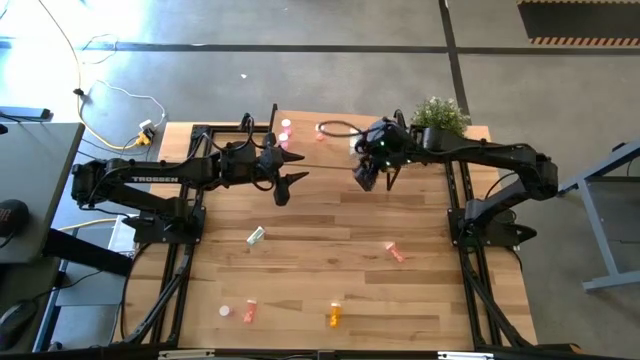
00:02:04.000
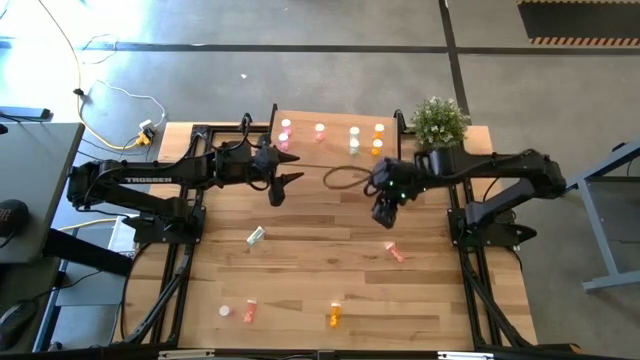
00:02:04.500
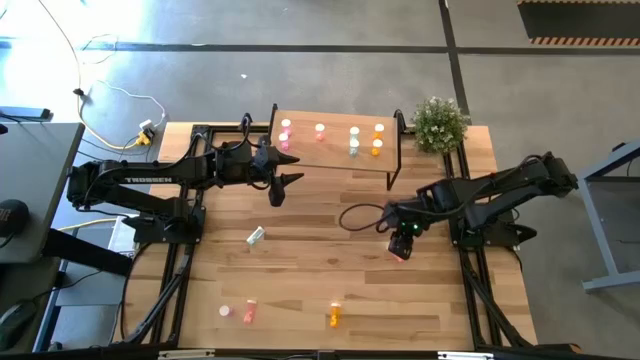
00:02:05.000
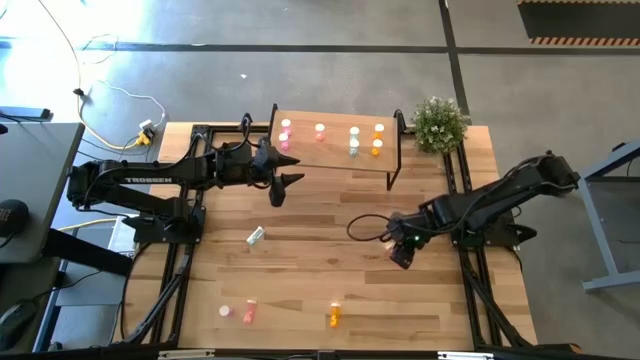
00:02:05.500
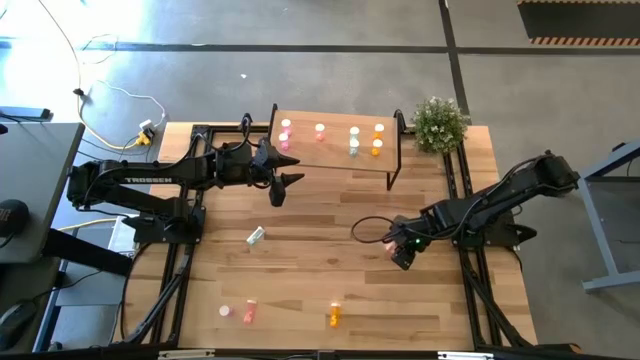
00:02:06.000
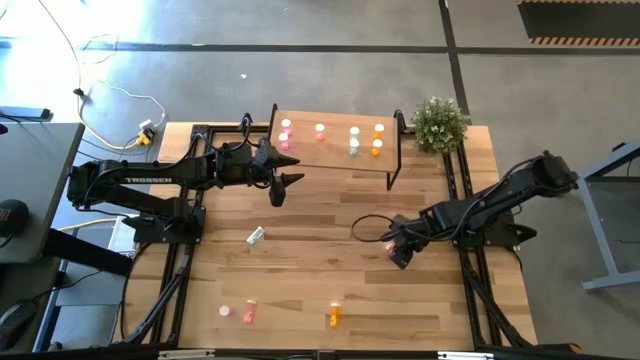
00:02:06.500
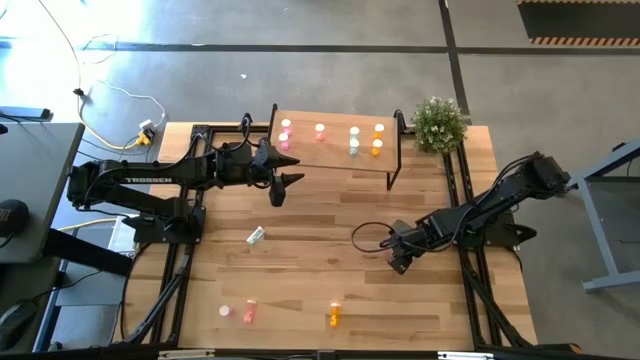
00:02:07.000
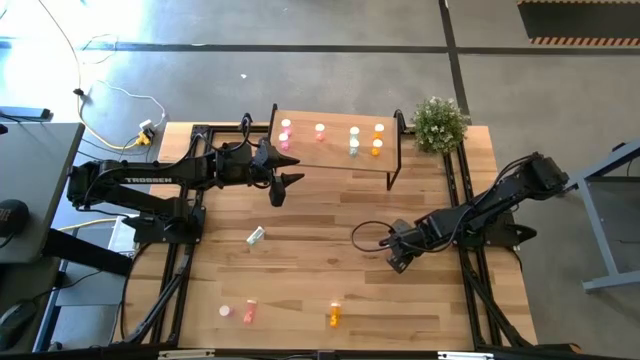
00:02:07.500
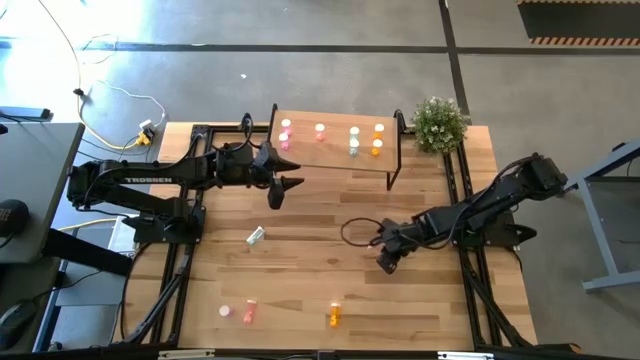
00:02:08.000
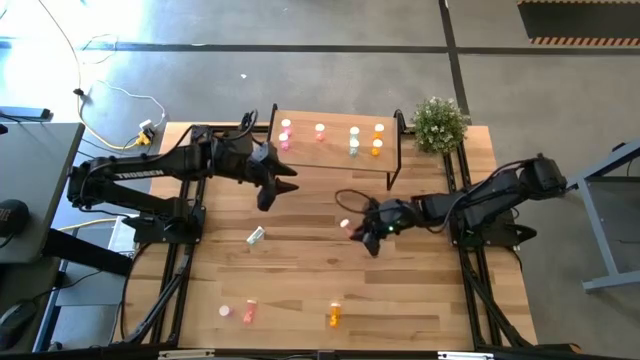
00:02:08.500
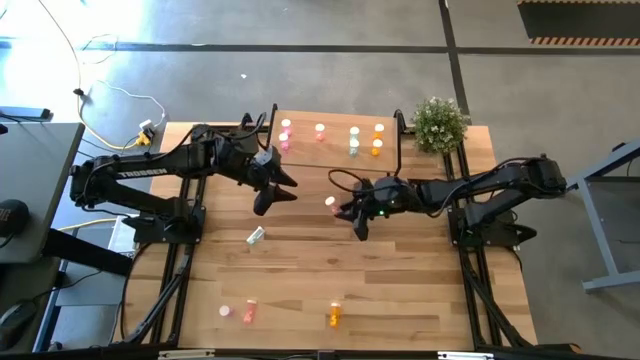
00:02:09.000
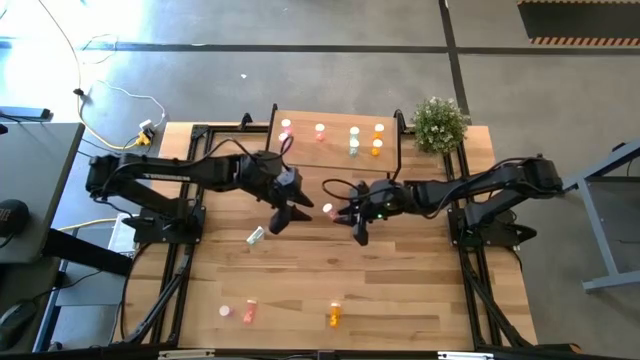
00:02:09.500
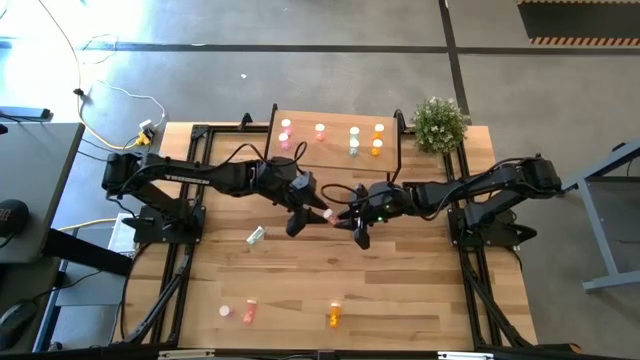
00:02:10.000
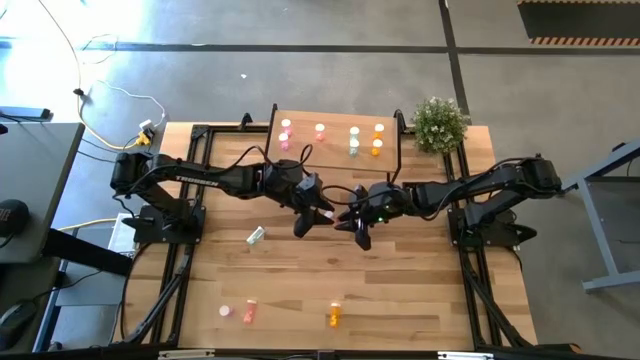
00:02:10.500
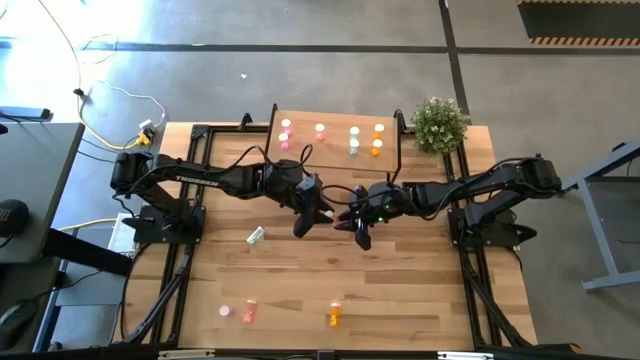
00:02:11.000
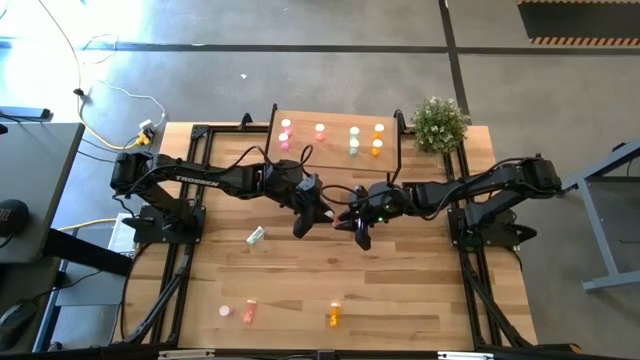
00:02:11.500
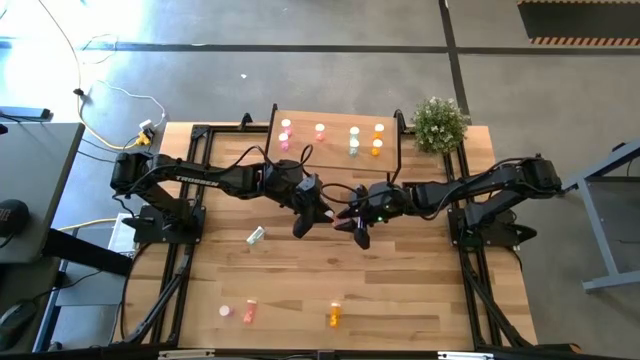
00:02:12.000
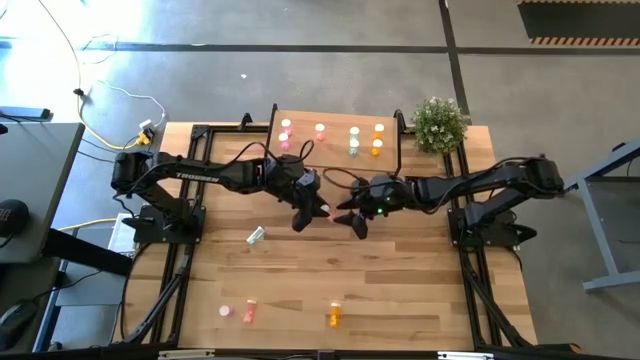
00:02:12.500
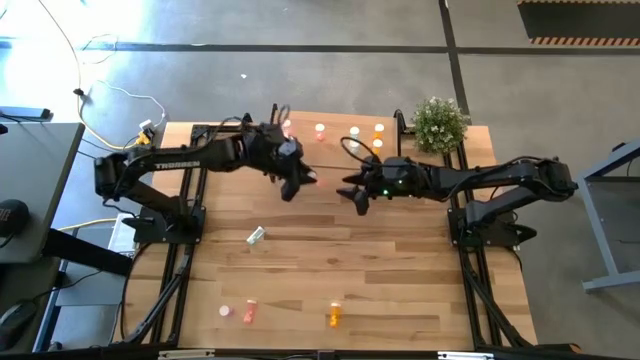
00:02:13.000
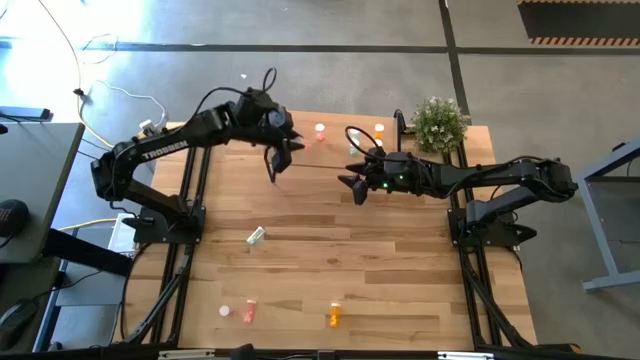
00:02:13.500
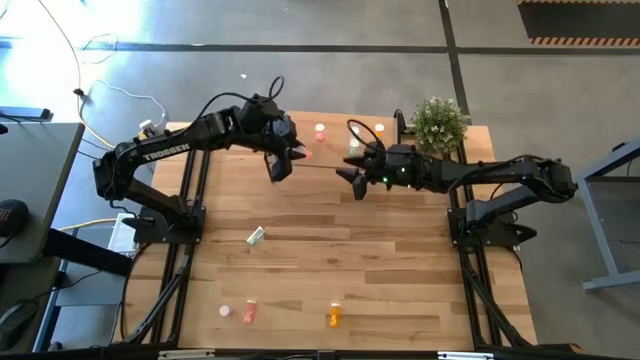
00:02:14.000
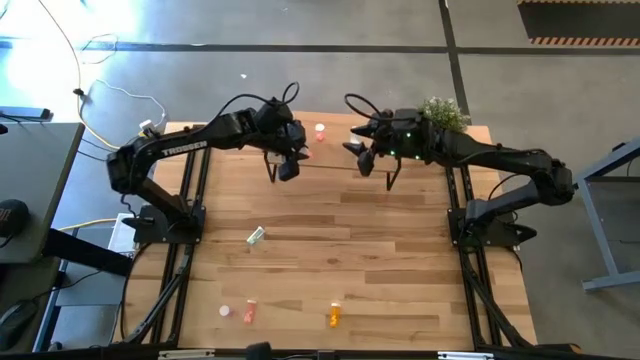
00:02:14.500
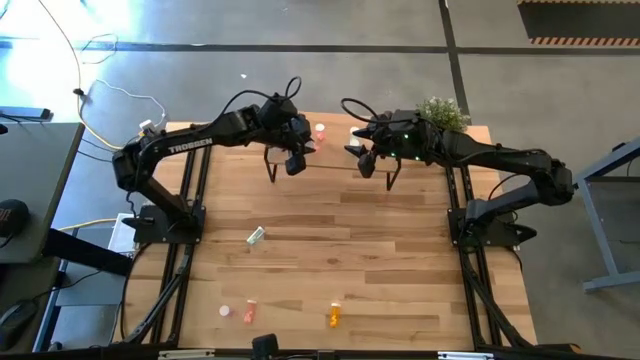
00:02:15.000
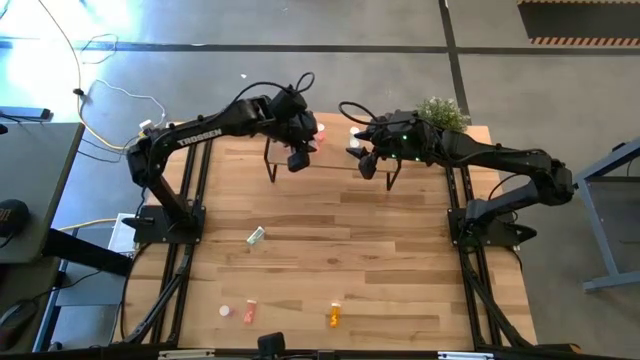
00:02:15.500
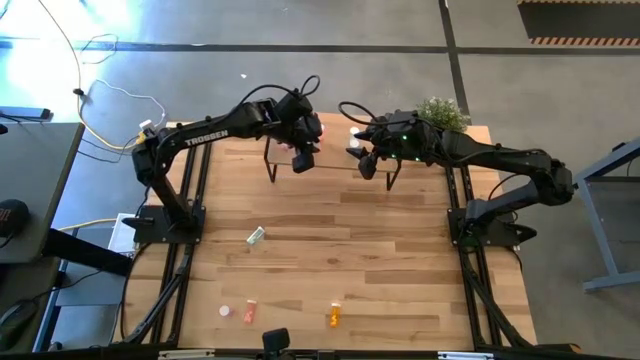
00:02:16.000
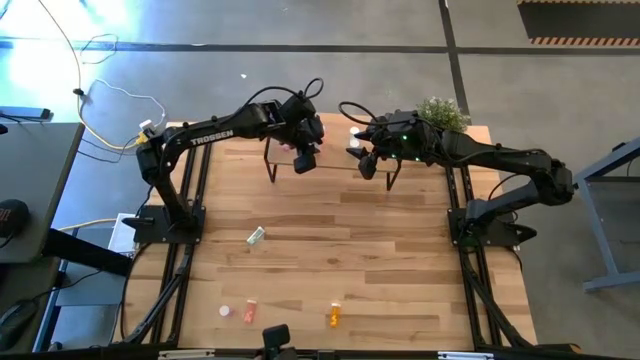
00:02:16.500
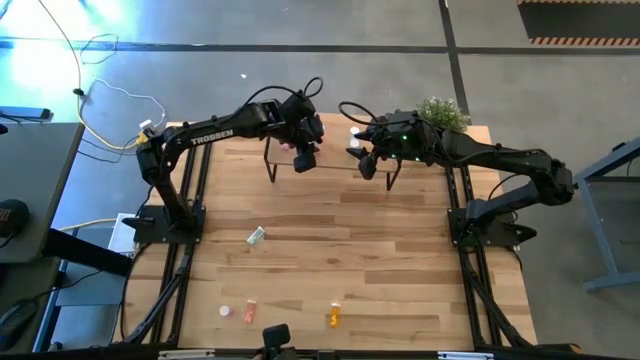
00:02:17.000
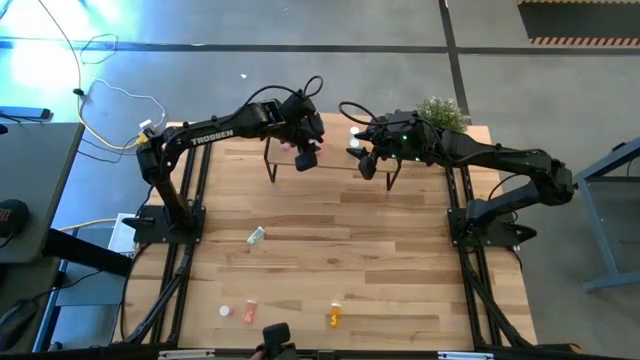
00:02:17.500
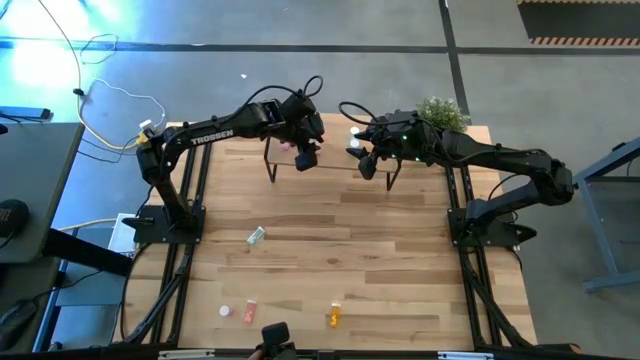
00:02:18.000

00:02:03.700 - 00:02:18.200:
Task: Pick and place medicine bottles onto shelf by color
Put the top pink pill bottle aligned with the other pink pill bottle on the shelf

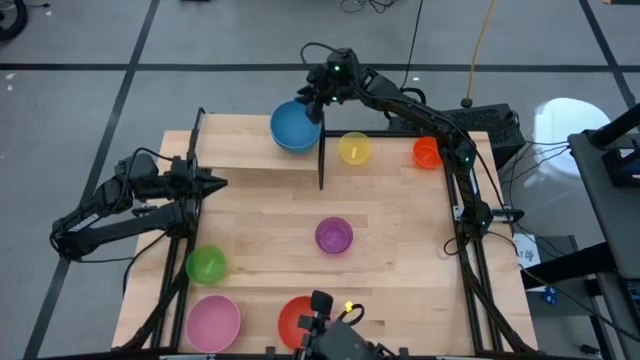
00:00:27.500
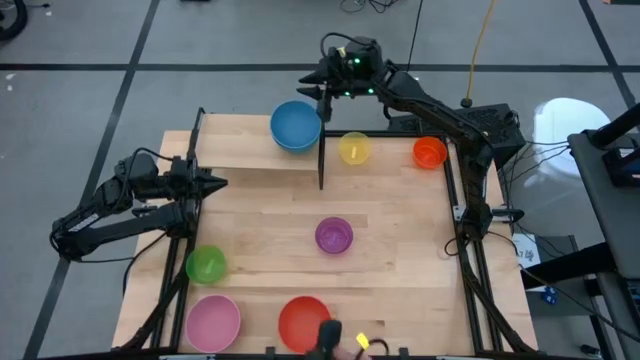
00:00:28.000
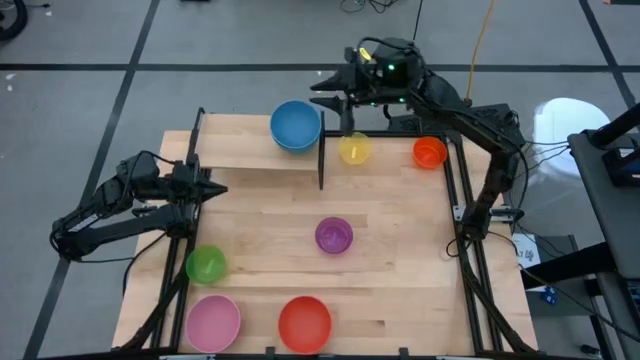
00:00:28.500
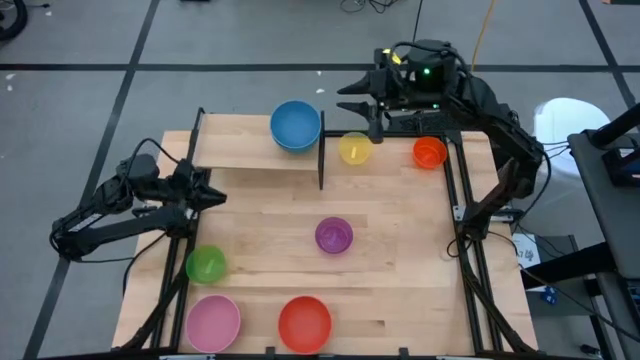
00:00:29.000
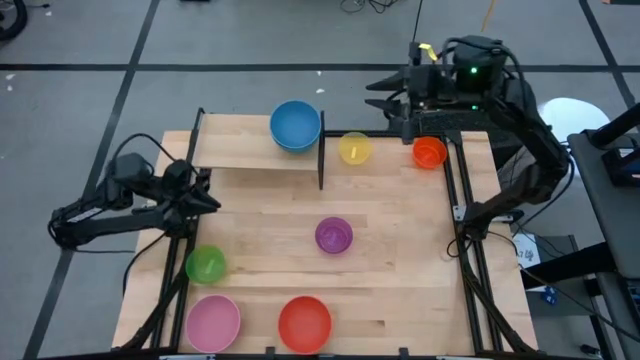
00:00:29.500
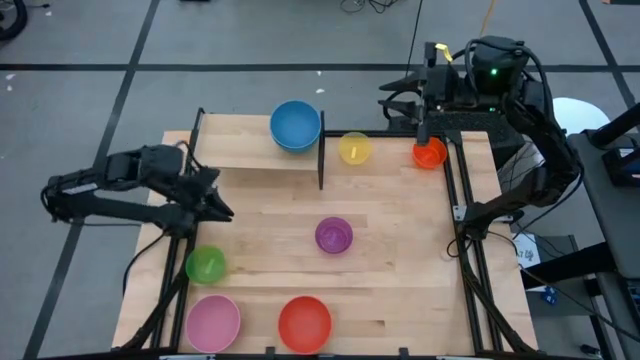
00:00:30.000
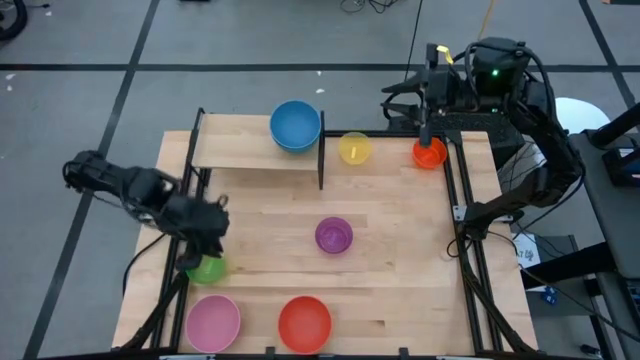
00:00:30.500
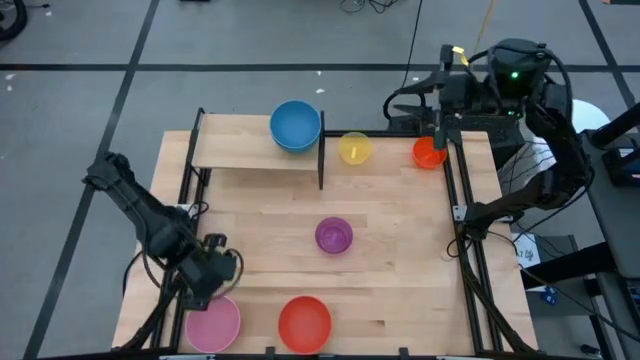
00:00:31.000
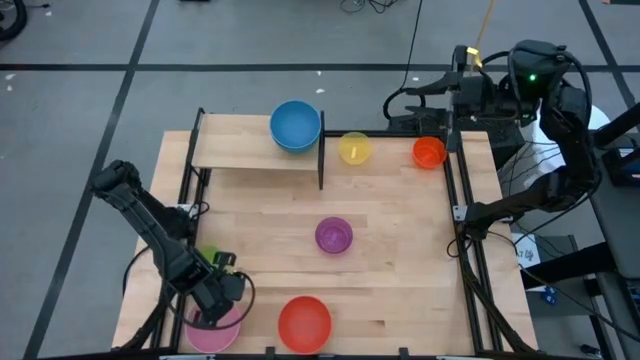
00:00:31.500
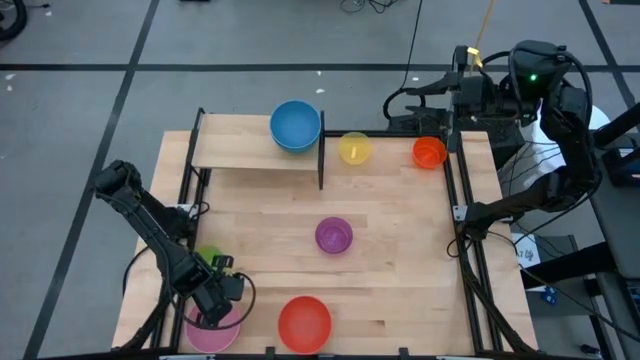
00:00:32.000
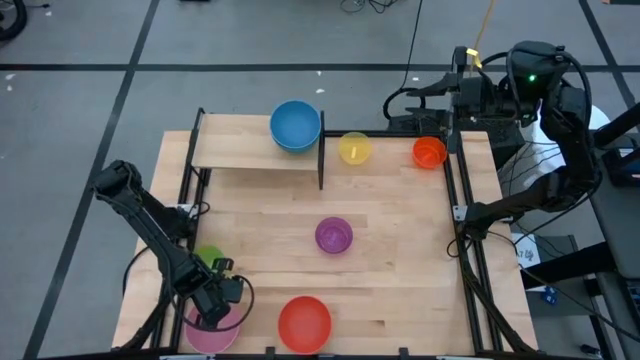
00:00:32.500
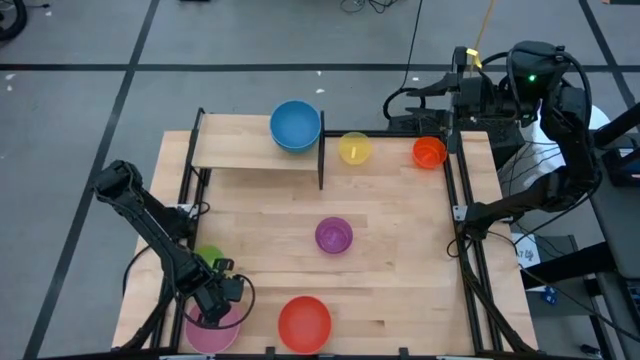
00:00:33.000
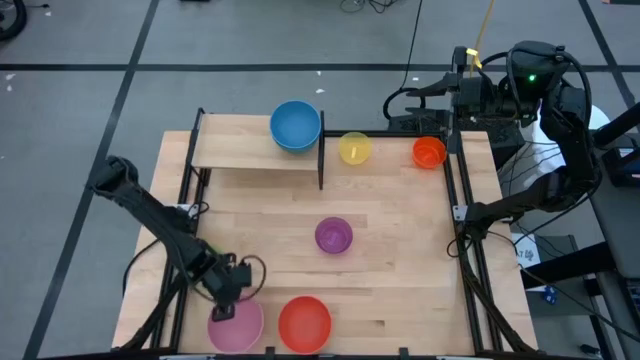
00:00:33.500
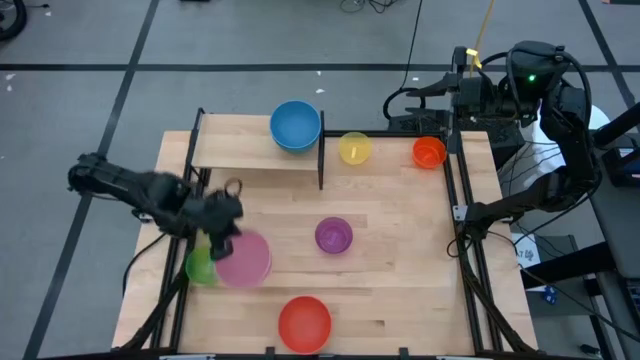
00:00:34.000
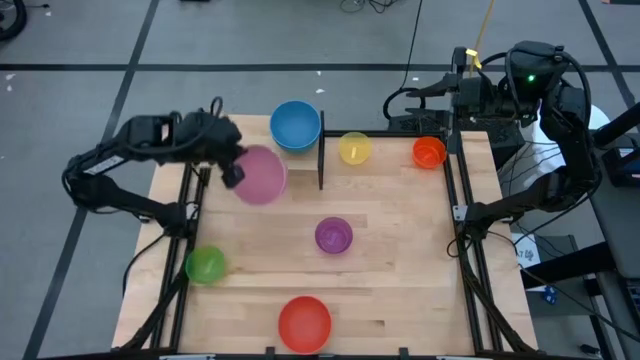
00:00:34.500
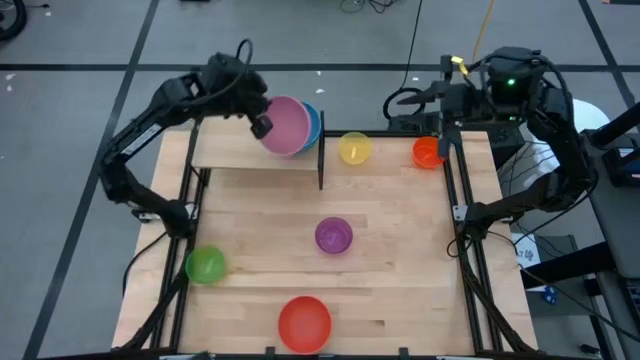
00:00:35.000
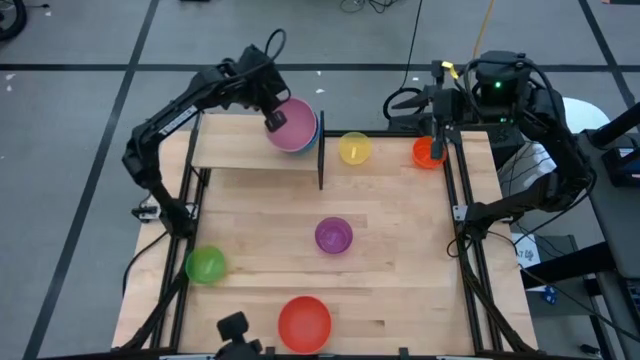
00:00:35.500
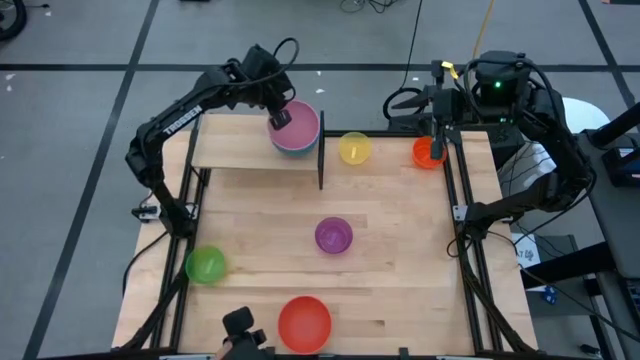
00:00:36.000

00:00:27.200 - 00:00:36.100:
Task: Place and stack bowls onto a shelf
Stack the pink bowl on top of the blue bowl on the shelf
